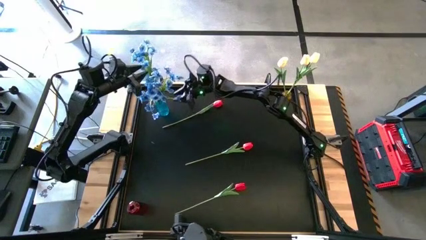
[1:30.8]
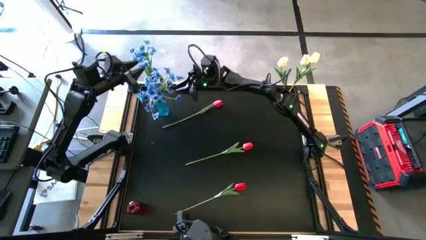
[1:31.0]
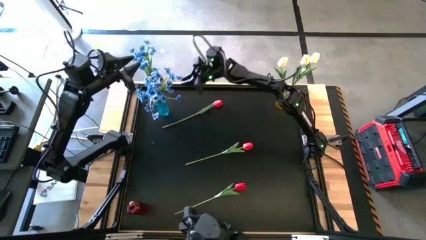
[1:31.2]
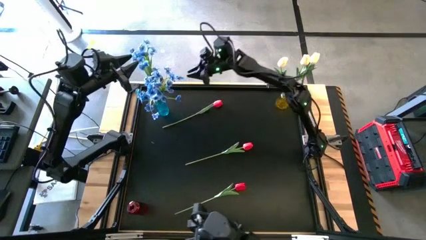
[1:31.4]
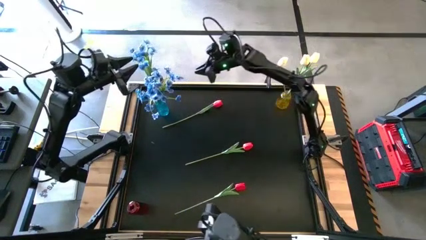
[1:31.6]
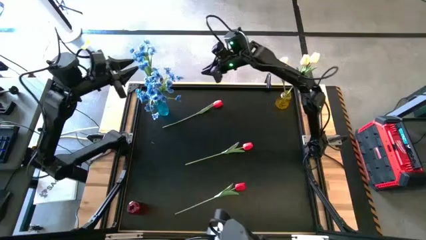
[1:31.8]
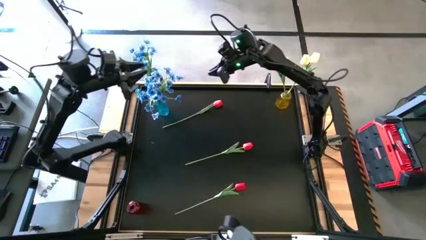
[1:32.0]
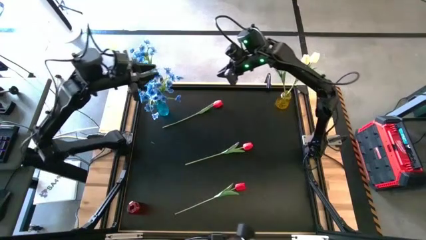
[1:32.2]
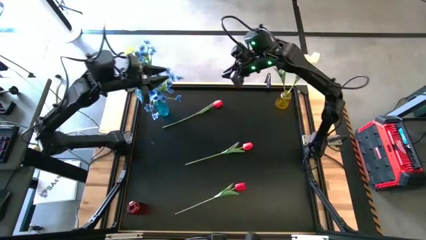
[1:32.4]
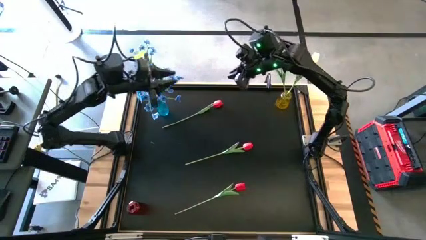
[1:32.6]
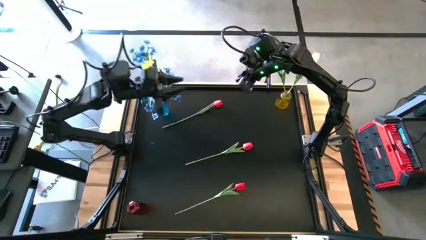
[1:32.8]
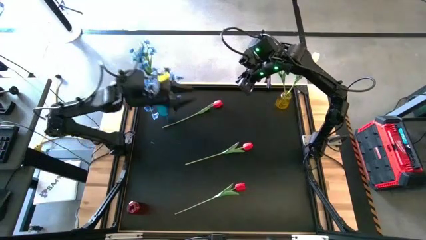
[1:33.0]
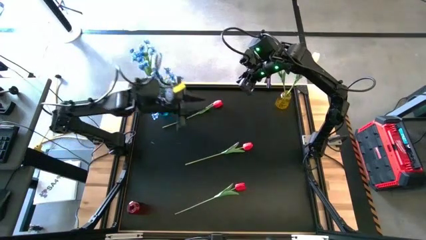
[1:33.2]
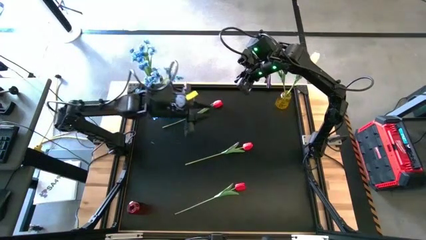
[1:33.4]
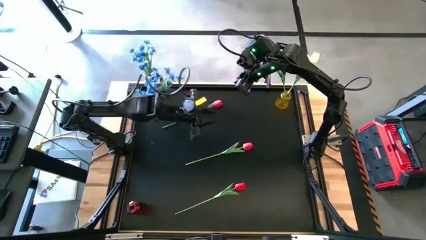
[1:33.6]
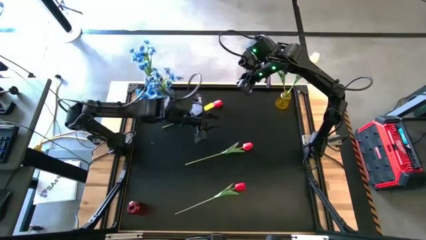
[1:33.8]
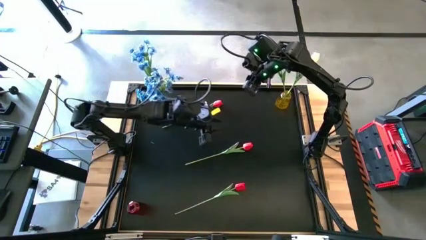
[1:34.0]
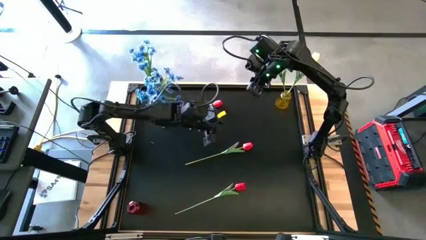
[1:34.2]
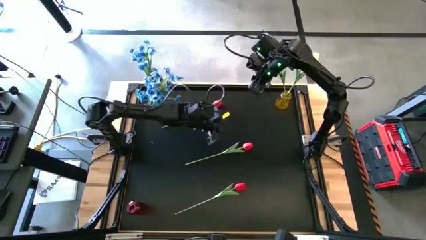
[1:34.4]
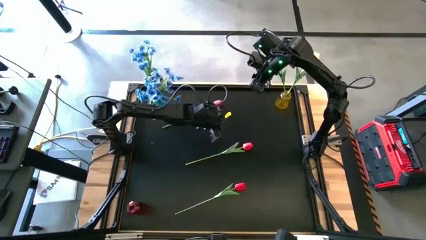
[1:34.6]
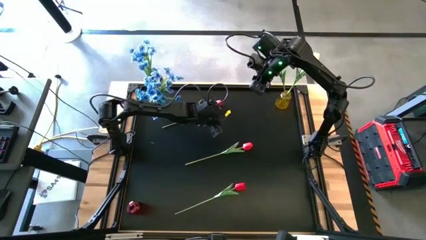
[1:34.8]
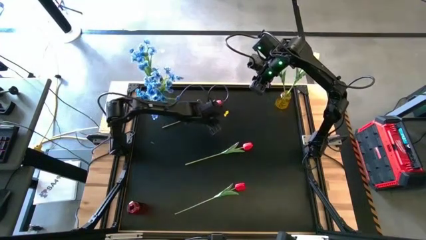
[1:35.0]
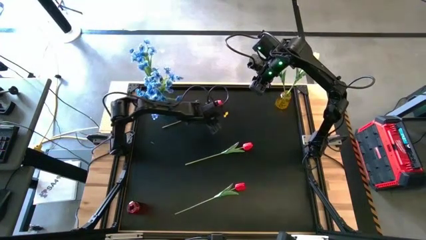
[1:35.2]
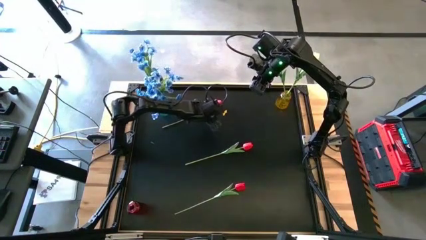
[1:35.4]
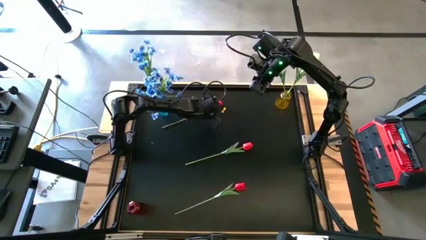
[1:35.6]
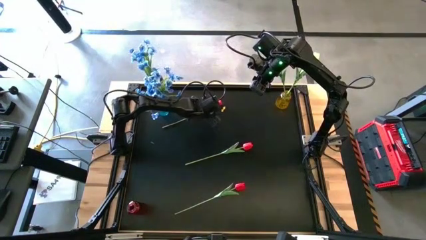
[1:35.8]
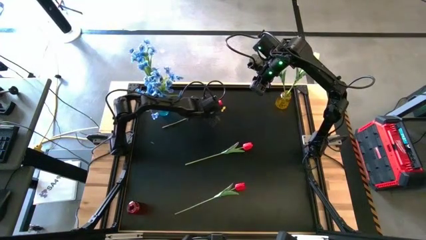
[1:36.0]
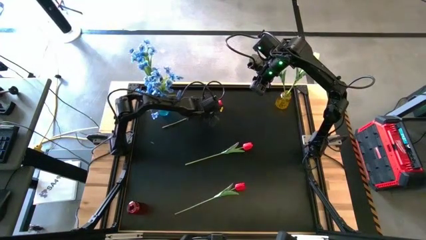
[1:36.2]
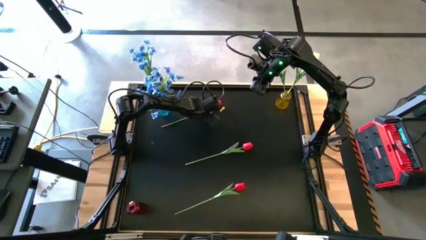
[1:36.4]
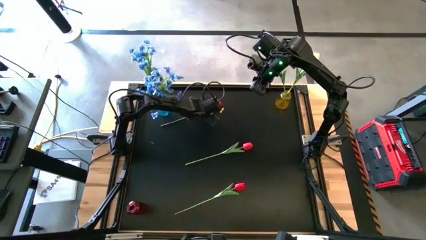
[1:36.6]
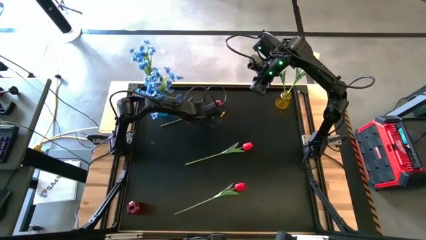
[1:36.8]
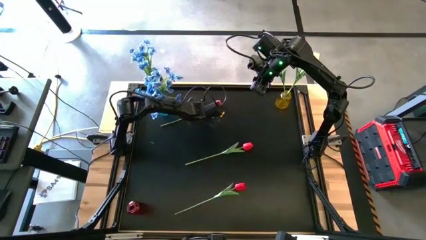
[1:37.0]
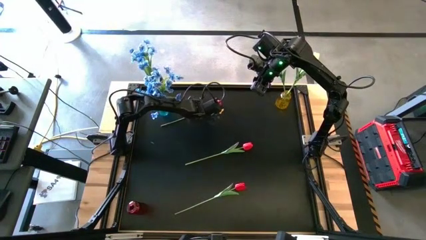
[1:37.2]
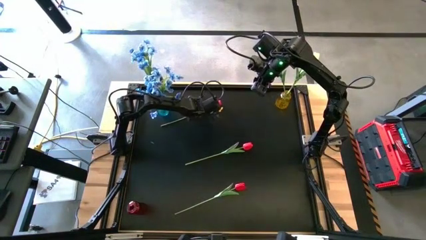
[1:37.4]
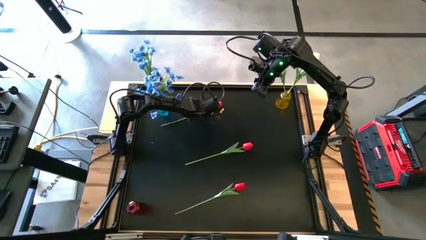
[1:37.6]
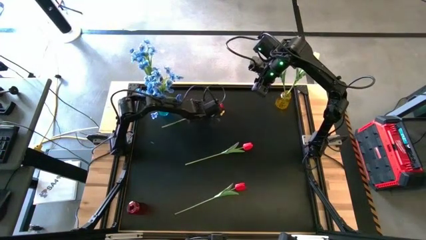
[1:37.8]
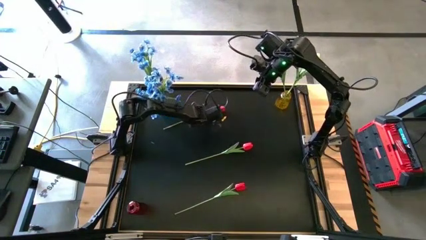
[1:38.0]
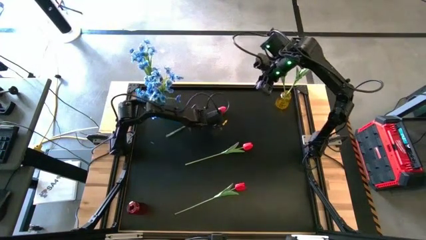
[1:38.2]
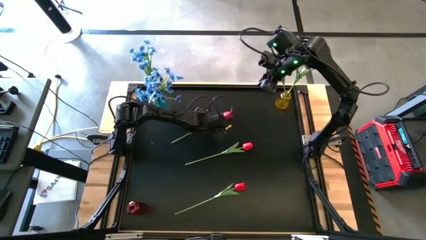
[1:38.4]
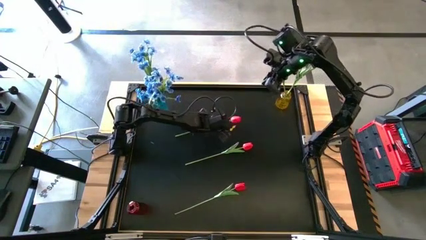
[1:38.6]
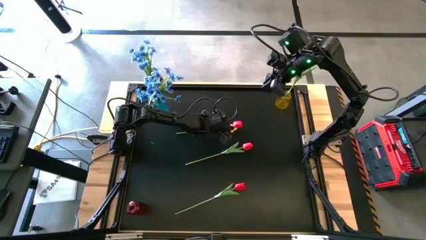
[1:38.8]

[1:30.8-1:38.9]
Task: Sort flowers into vase by color
Put the top red flower into the red vase

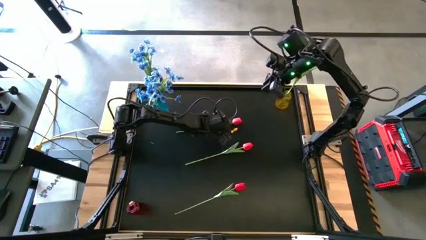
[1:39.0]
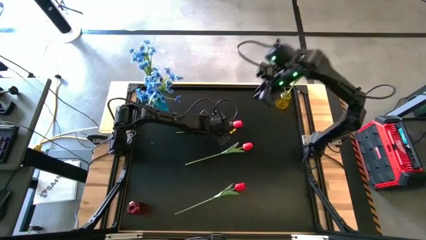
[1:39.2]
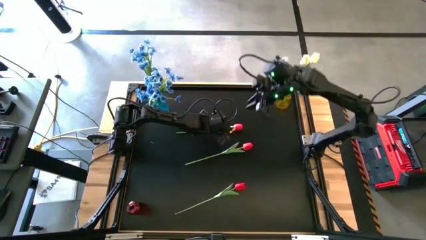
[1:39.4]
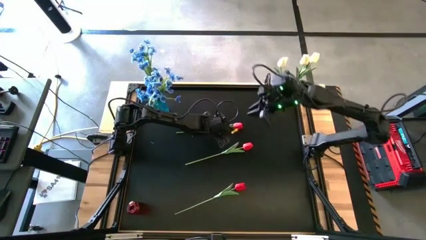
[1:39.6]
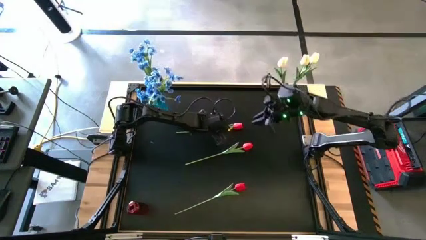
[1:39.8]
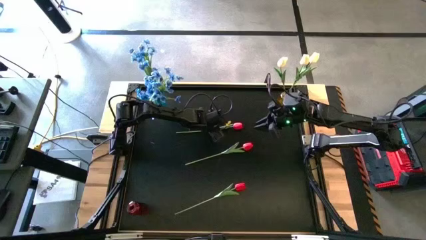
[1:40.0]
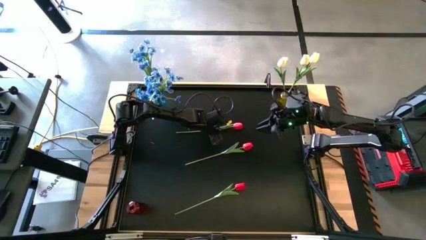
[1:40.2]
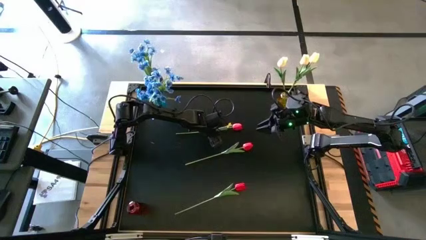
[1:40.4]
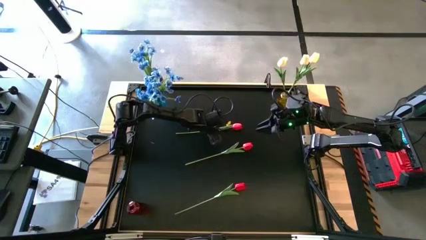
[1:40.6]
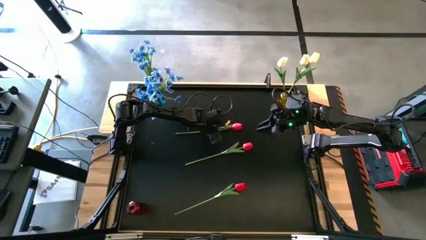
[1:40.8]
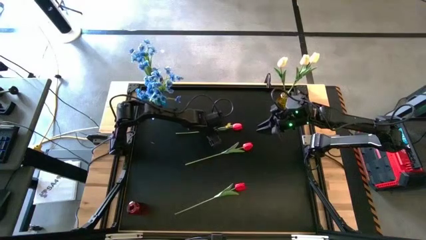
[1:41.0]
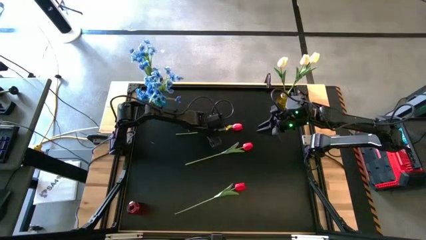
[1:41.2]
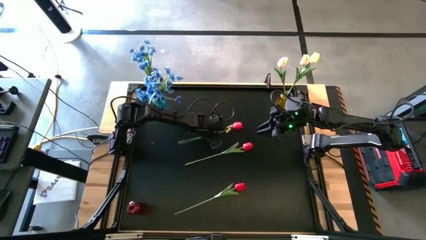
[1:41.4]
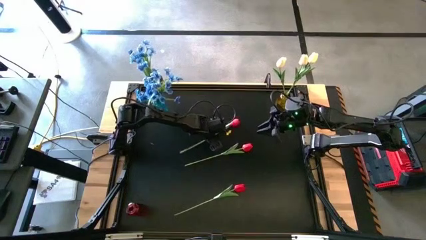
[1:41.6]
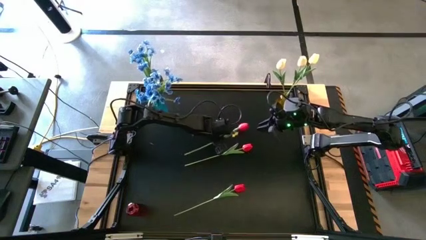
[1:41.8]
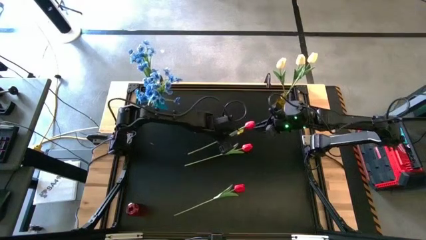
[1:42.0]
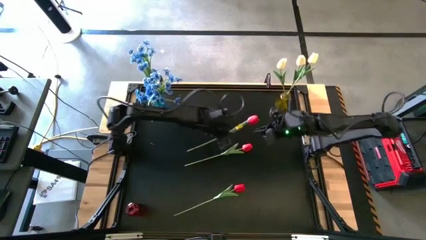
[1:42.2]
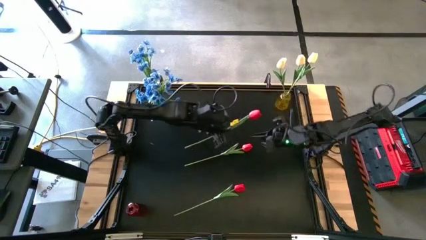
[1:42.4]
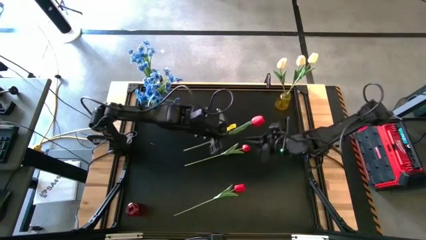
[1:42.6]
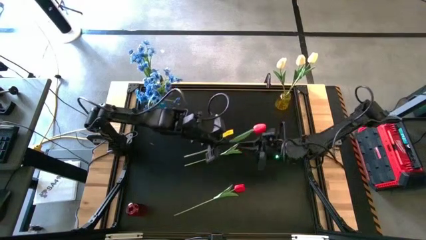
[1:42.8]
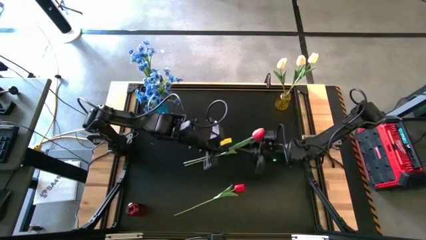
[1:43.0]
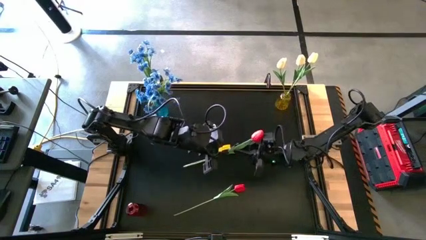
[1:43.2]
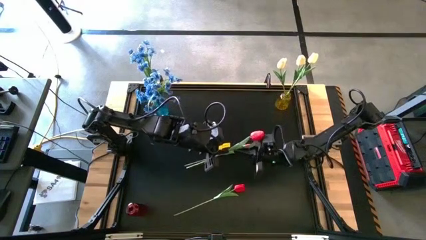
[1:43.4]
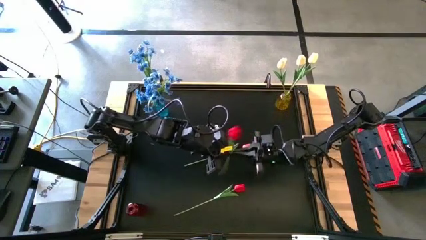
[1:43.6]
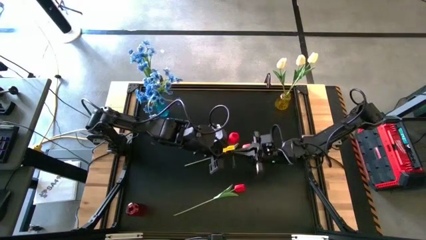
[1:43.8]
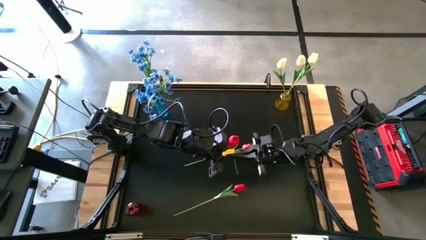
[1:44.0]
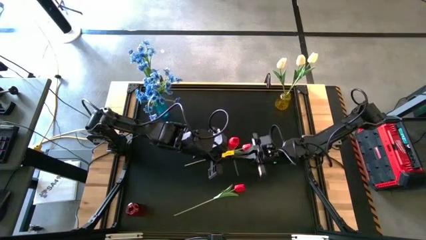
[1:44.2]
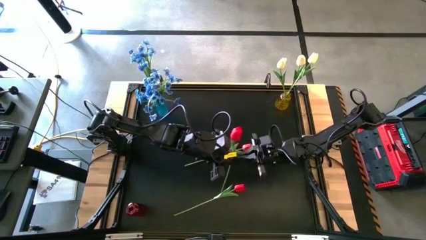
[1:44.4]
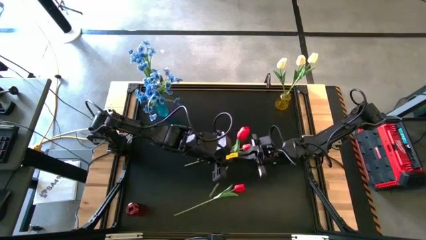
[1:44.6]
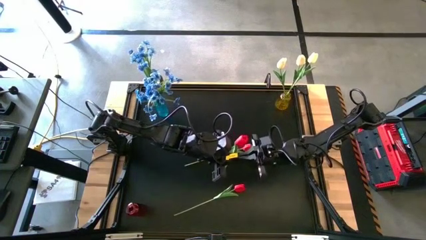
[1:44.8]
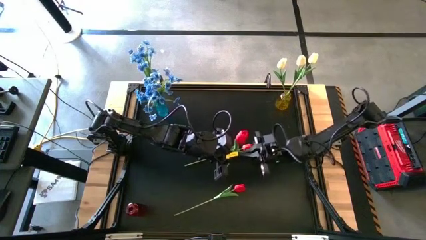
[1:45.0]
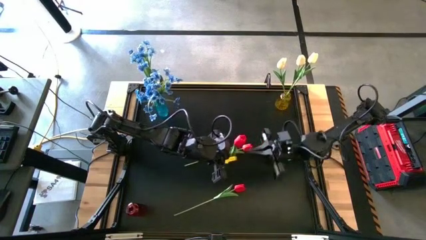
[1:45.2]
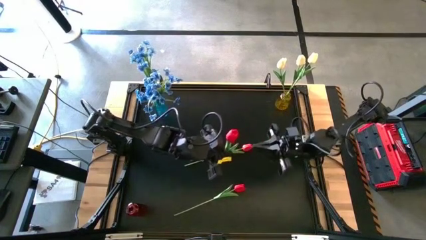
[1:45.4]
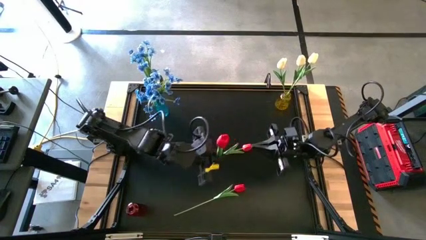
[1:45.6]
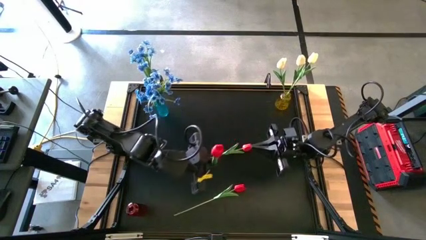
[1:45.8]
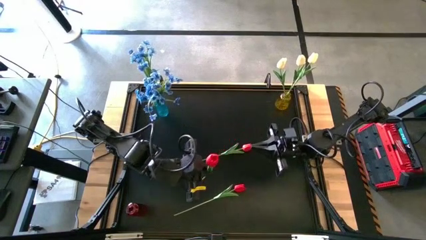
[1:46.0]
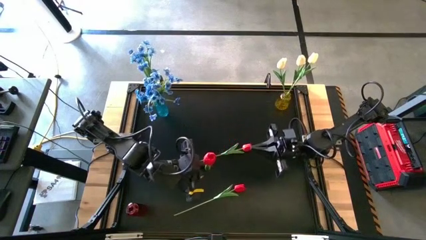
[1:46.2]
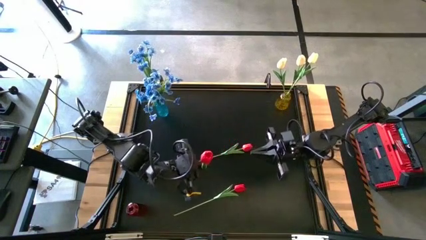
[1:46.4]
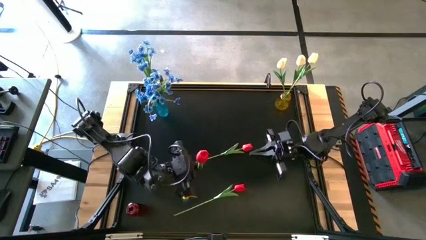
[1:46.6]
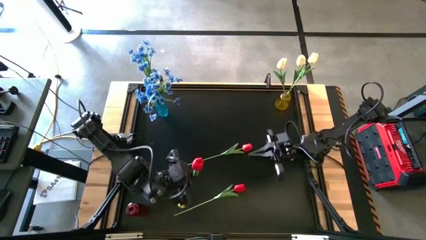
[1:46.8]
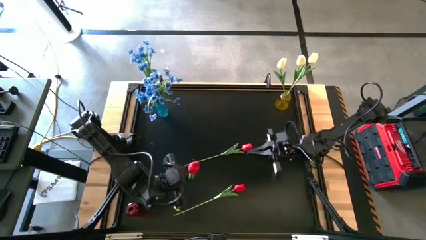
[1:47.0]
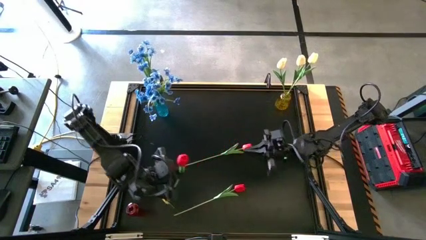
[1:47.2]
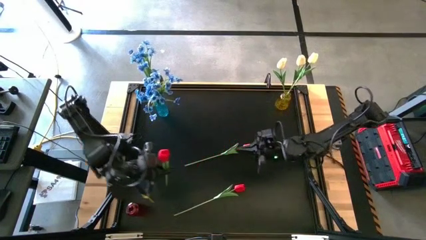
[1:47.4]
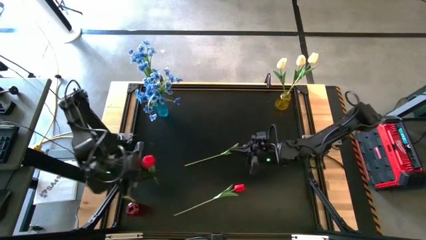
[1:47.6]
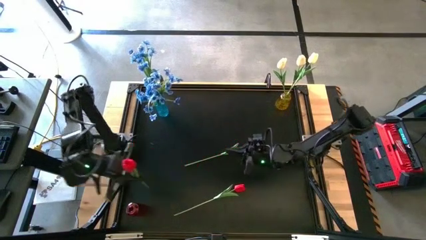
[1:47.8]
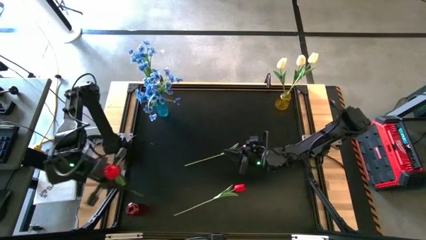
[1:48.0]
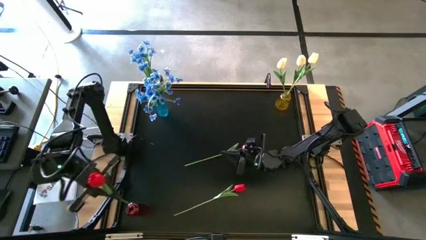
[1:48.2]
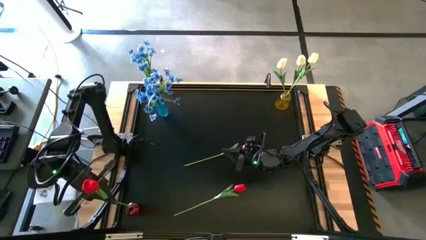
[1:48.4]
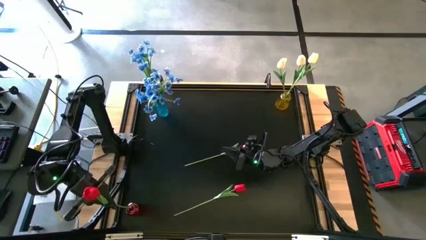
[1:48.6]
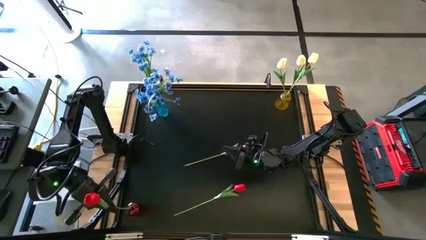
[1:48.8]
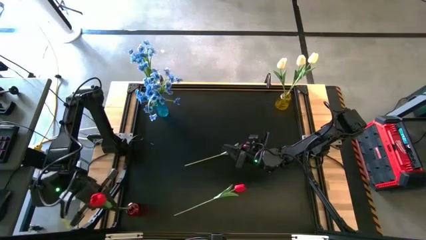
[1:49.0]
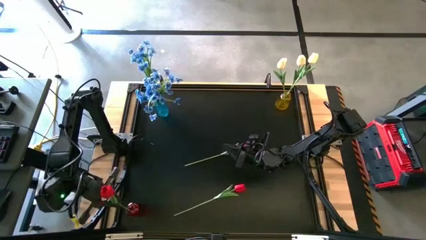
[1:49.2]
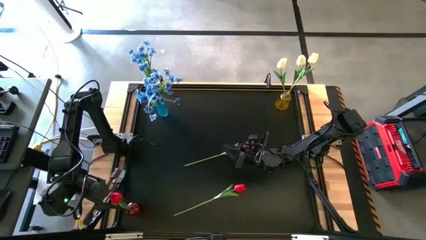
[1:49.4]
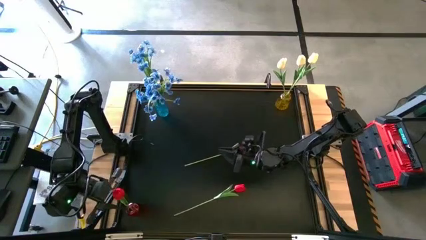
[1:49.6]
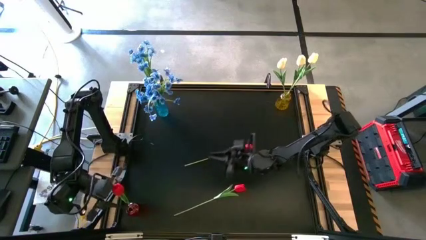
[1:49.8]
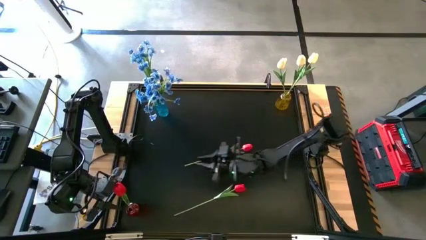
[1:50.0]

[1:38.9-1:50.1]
Put the top red flower into the red vase
